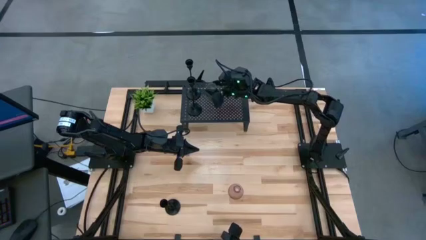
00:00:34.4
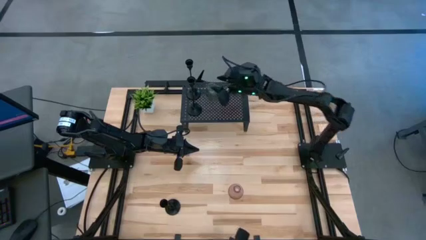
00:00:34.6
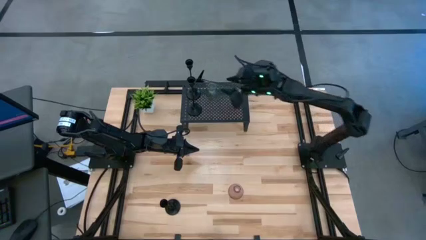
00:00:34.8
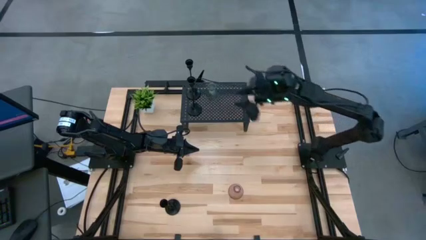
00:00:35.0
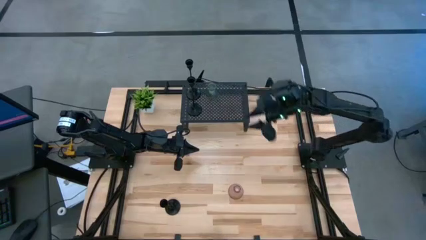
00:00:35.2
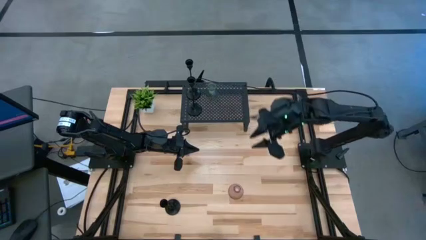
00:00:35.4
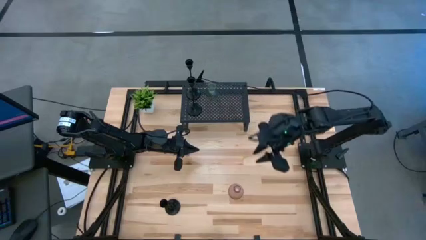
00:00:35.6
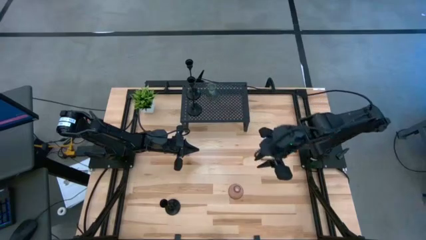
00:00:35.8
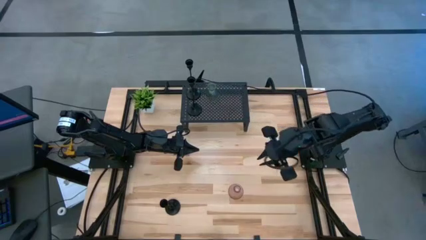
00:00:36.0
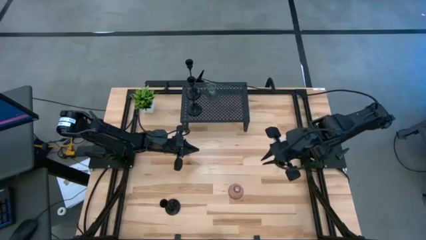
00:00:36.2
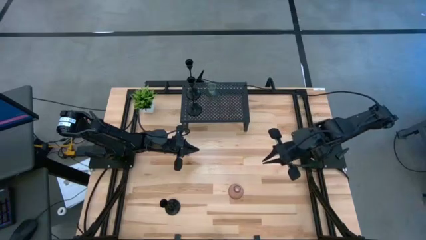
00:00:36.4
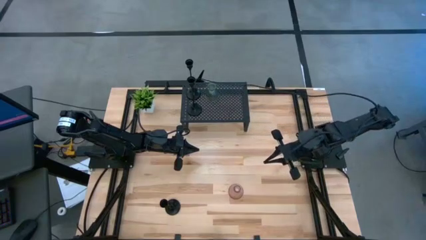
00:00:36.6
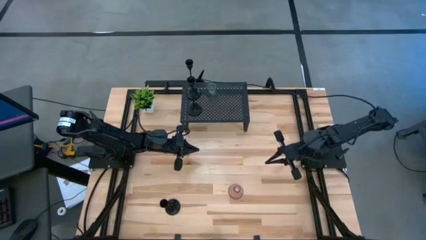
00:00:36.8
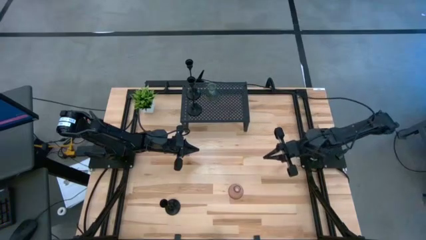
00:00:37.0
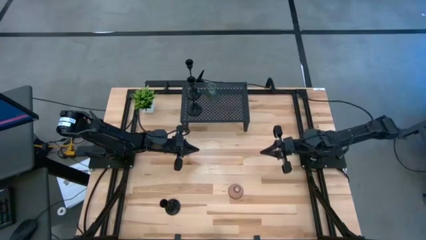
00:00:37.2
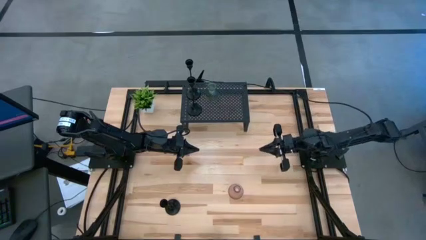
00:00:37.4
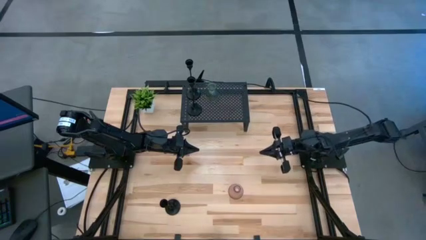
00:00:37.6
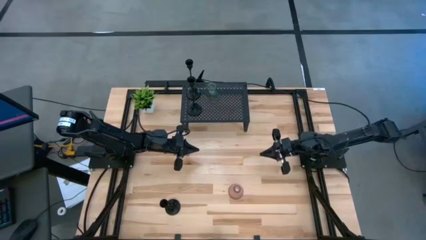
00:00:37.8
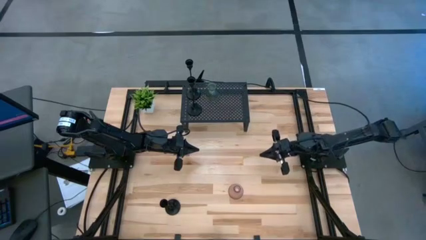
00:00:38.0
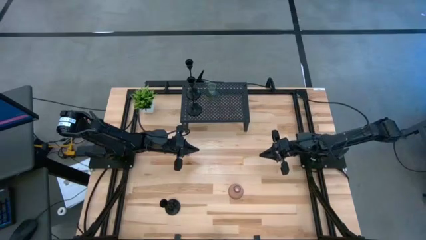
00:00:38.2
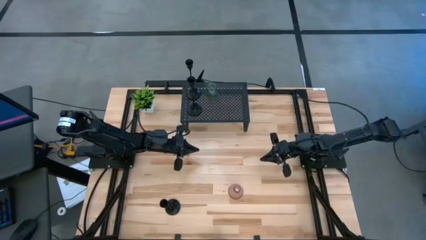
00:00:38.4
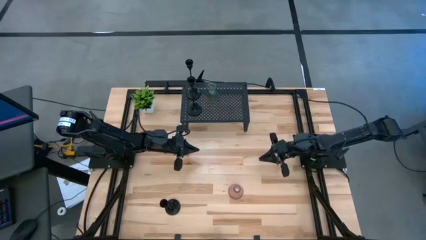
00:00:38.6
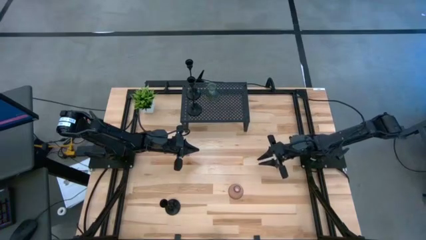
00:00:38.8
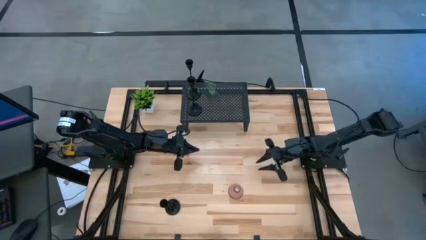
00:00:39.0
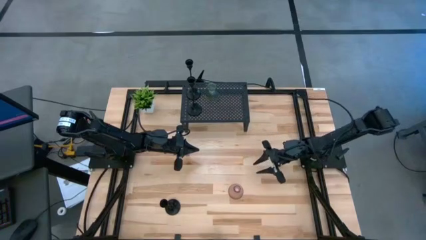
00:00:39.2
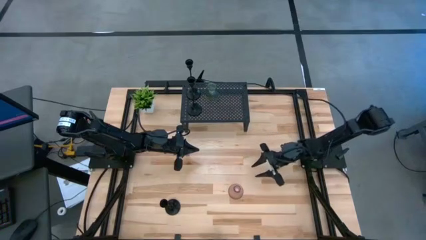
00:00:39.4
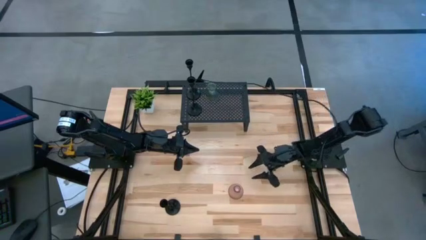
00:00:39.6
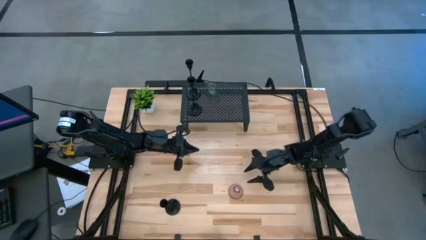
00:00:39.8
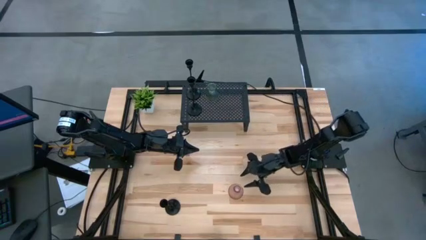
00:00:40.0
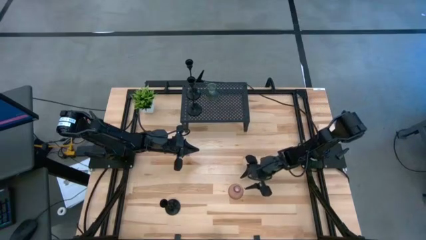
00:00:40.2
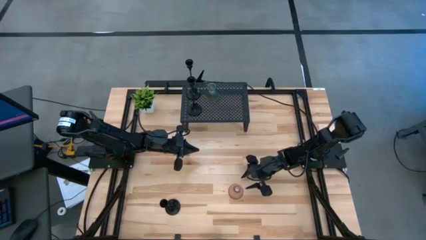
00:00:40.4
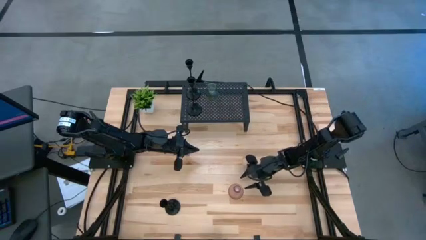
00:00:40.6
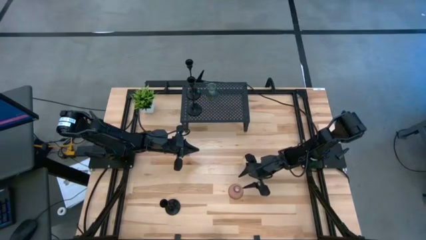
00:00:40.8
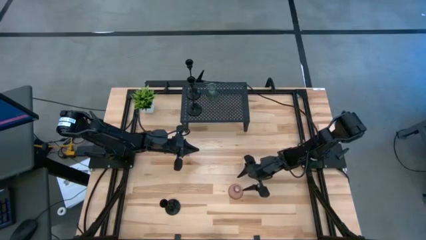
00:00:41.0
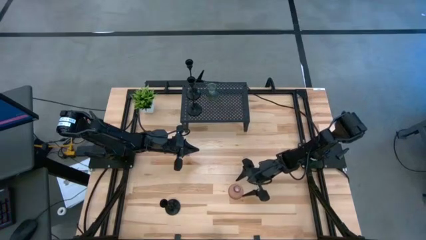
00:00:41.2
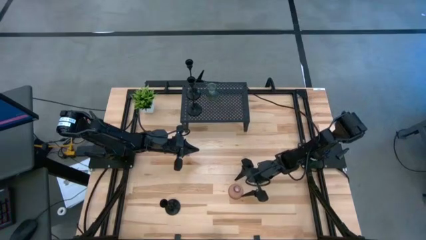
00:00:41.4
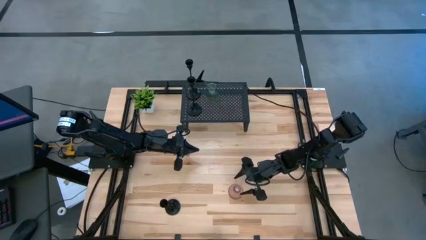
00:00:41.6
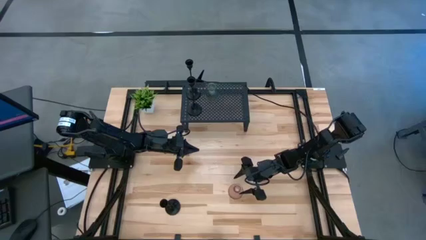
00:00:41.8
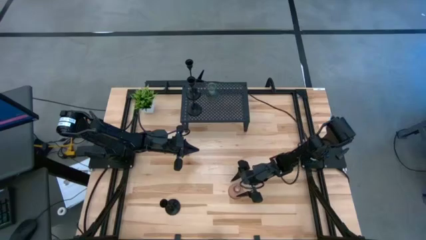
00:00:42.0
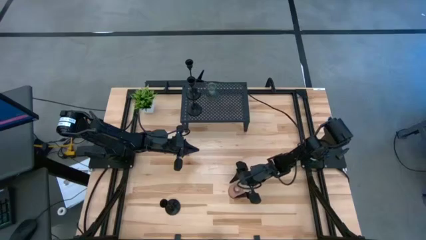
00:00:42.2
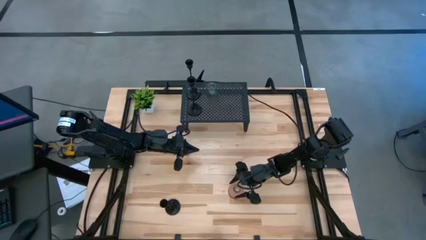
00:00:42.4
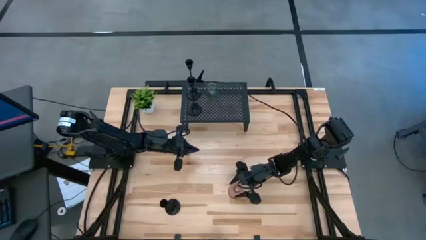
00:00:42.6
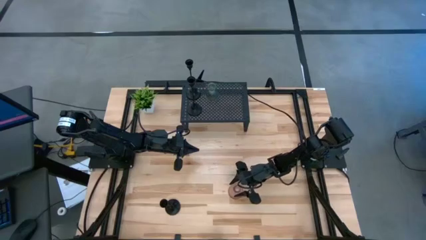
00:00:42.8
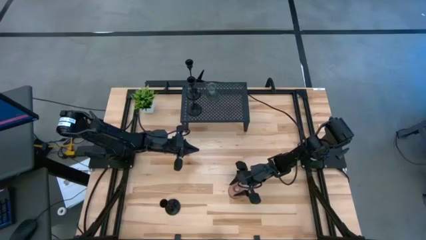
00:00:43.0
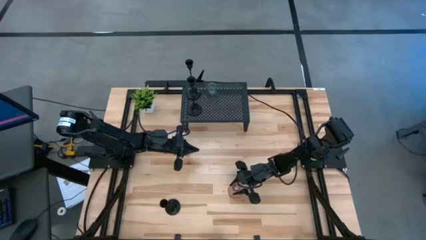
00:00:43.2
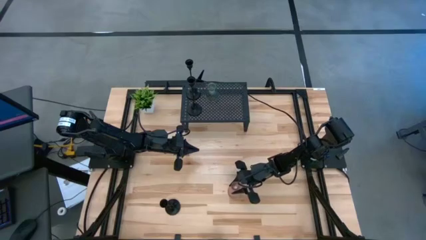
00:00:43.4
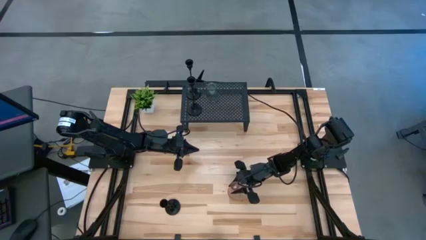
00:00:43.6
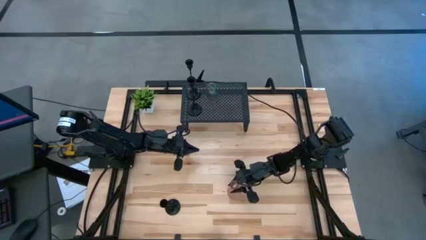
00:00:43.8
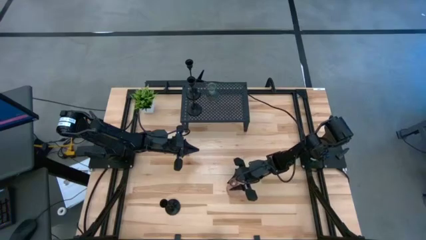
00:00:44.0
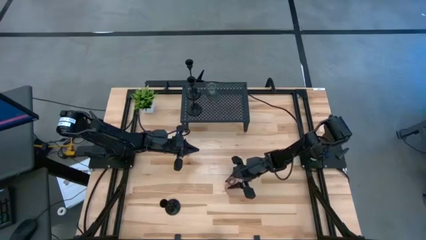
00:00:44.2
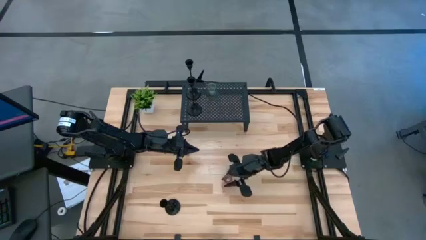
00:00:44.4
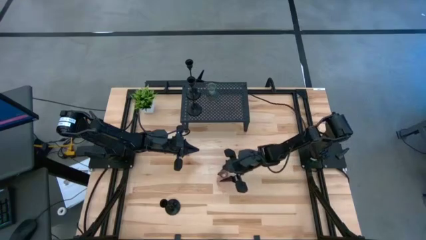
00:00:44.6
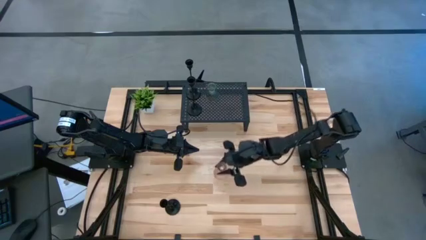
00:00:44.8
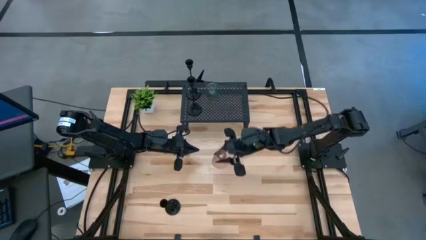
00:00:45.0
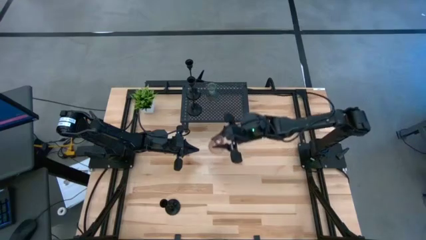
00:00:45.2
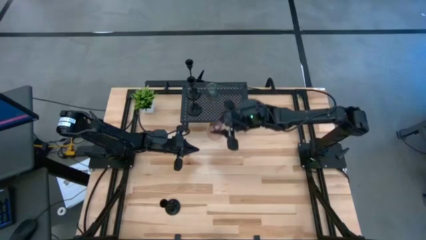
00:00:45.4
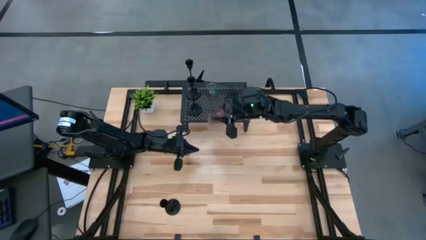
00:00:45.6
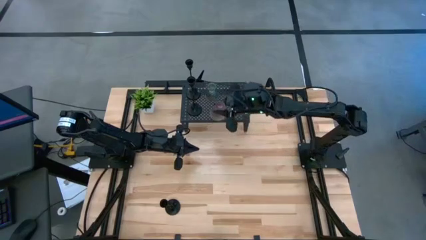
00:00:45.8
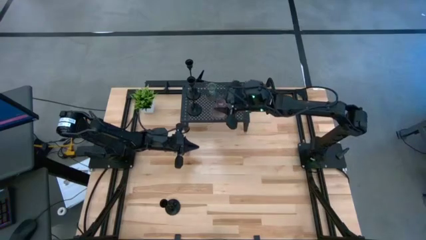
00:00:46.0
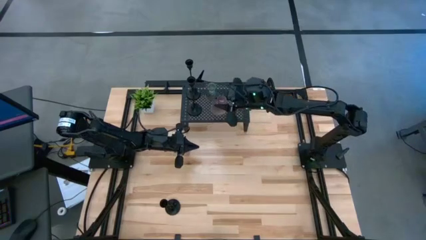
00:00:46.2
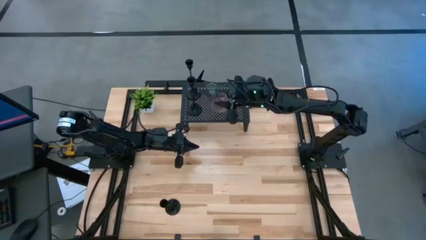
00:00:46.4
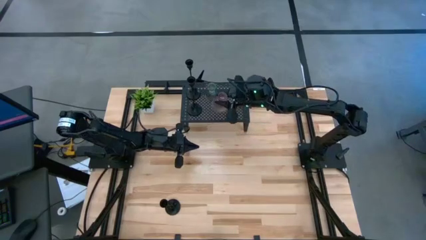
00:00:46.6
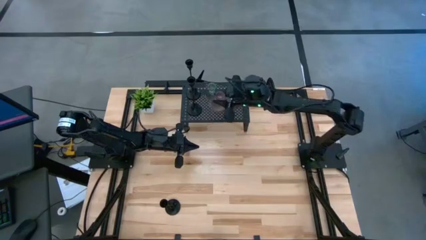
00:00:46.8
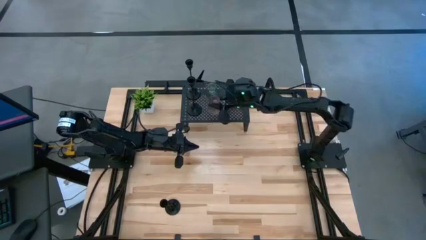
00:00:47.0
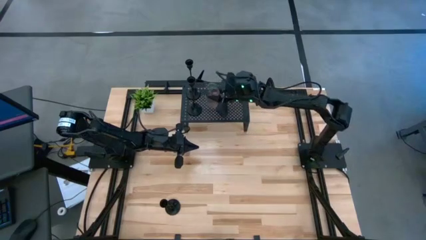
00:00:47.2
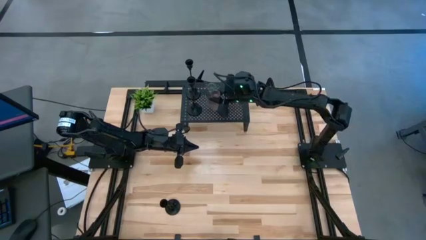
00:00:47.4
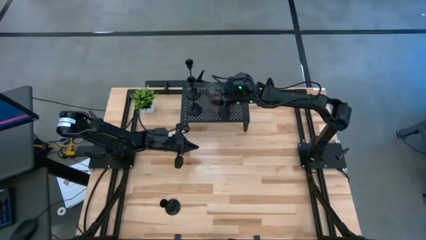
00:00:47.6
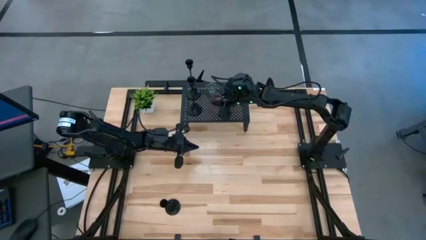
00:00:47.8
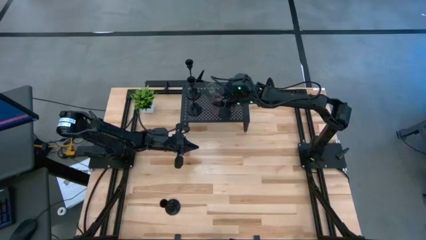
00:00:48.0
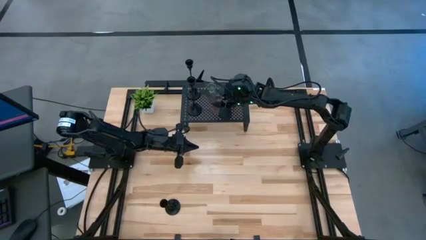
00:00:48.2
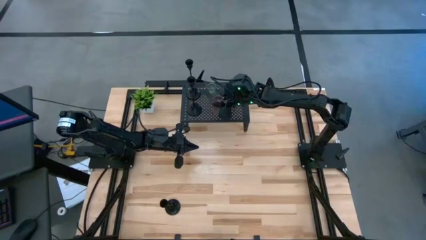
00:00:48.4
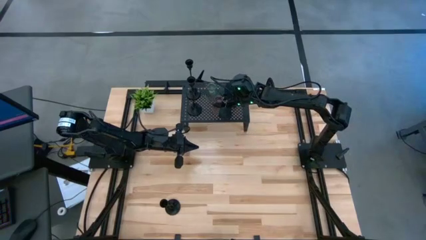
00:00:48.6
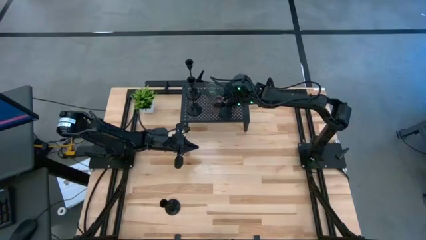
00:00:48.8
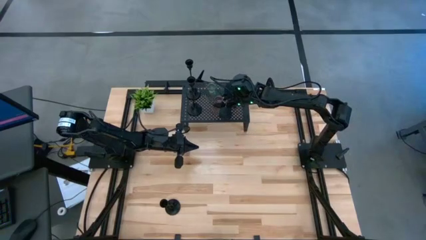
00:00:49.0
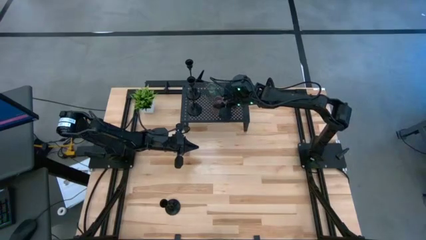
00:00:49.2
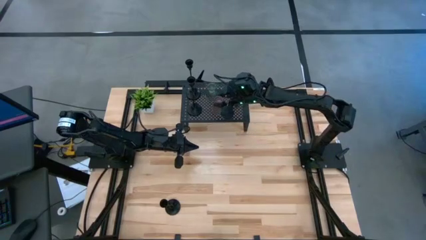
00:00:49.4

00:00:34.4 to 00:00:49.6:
Task: Pick & Place candle stick holders
Put the pink glass candle holder on the shelf
